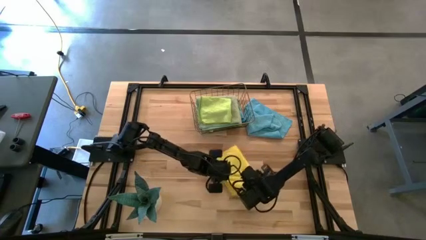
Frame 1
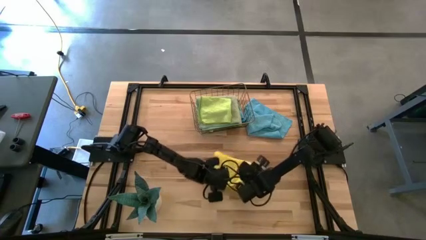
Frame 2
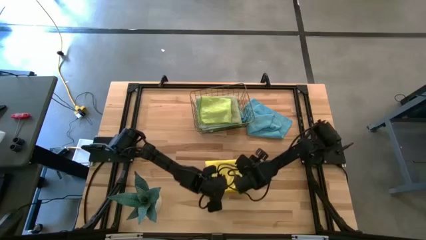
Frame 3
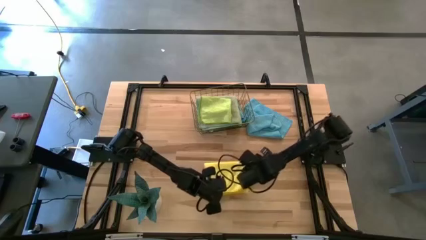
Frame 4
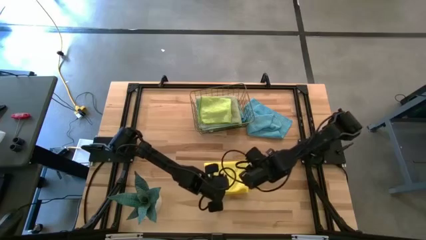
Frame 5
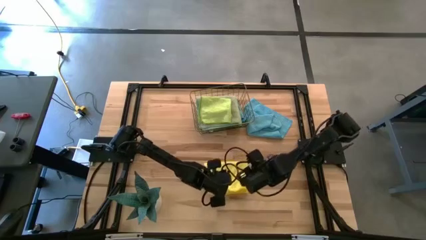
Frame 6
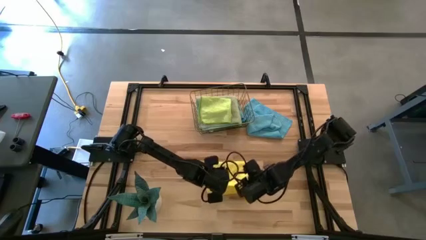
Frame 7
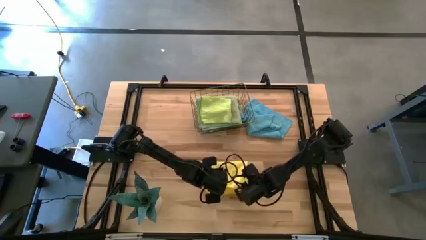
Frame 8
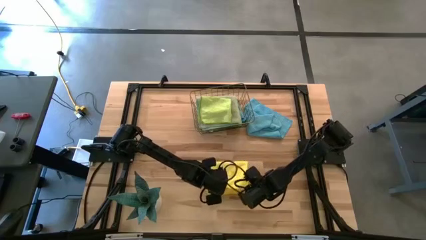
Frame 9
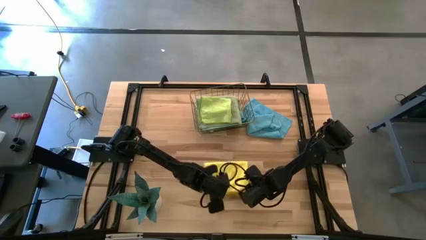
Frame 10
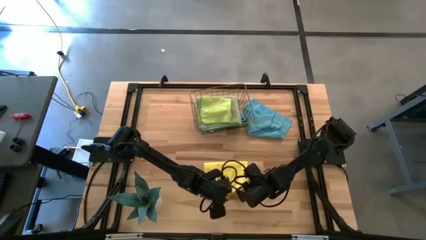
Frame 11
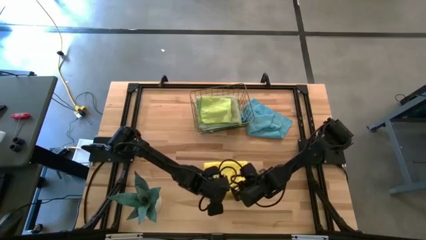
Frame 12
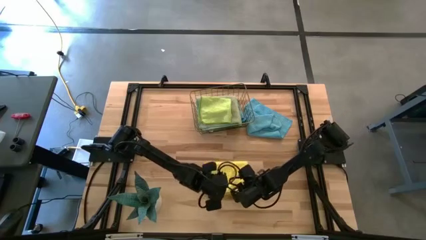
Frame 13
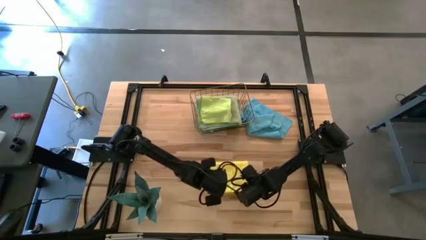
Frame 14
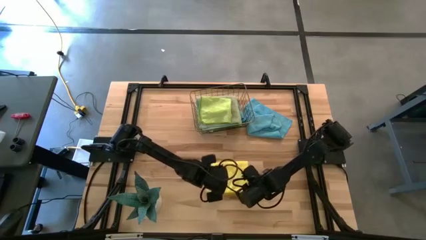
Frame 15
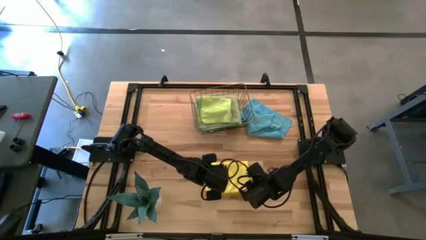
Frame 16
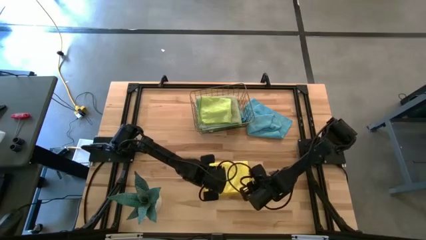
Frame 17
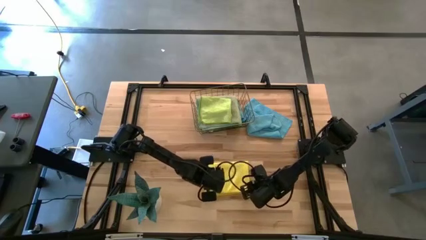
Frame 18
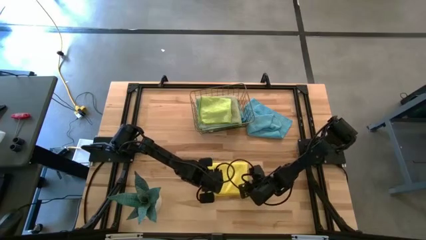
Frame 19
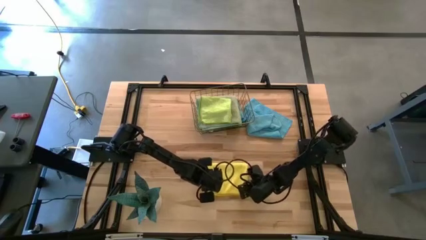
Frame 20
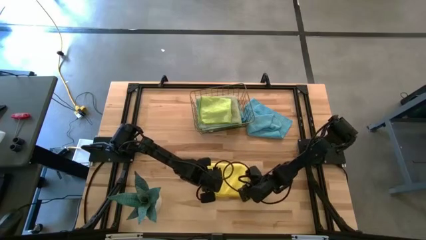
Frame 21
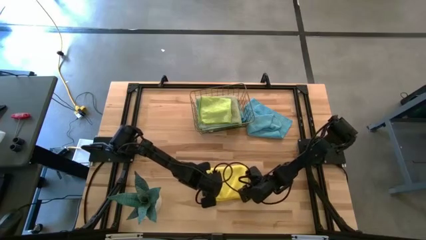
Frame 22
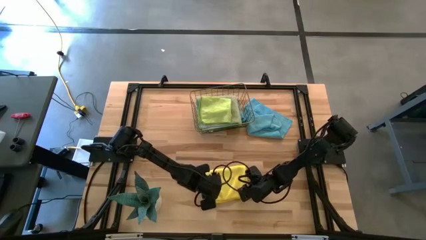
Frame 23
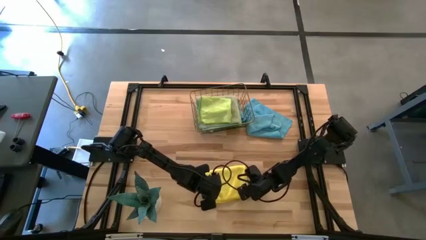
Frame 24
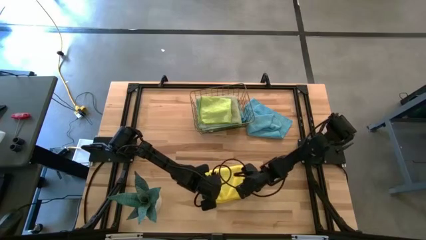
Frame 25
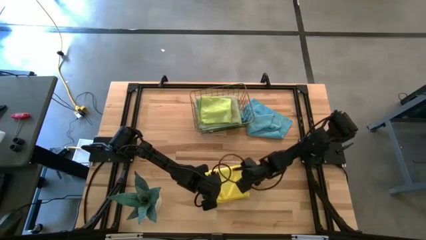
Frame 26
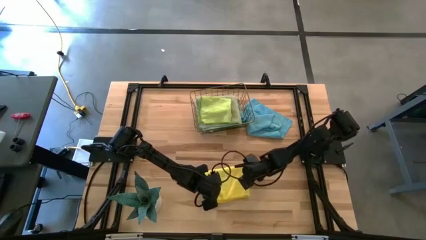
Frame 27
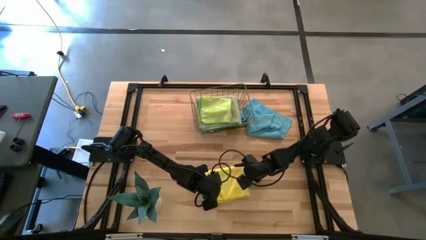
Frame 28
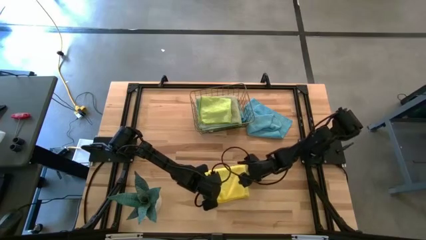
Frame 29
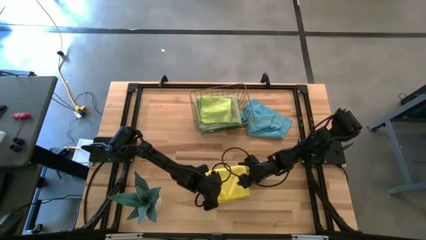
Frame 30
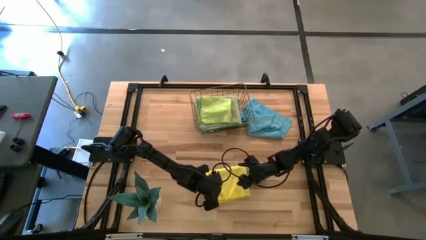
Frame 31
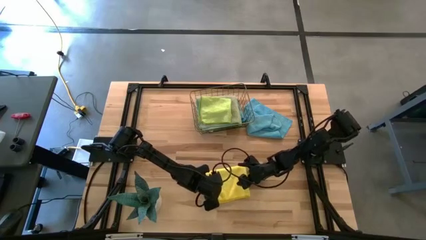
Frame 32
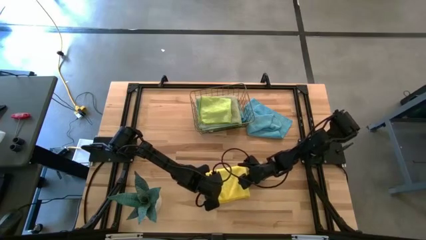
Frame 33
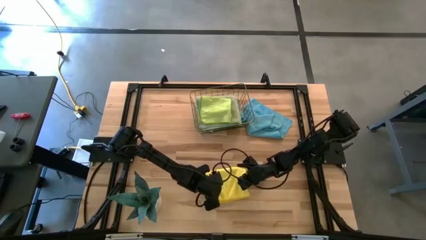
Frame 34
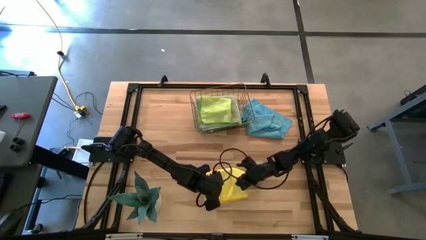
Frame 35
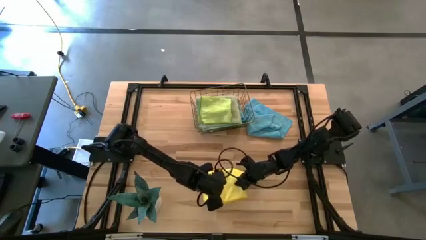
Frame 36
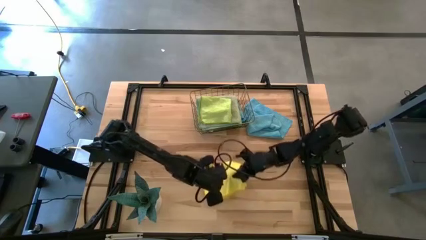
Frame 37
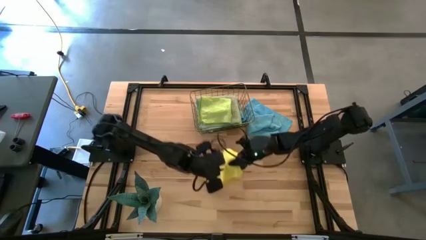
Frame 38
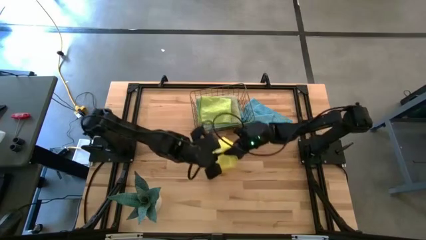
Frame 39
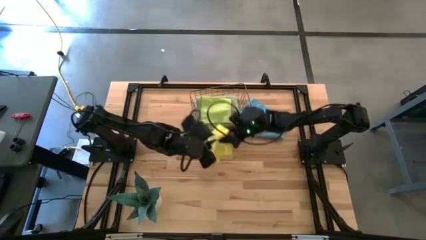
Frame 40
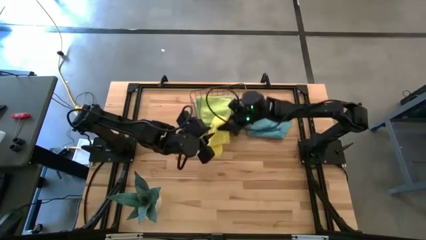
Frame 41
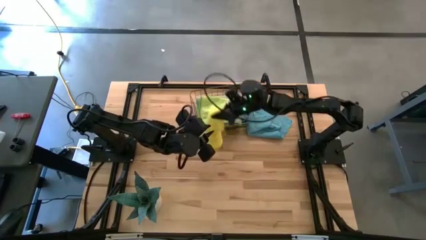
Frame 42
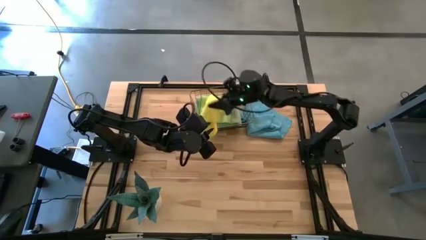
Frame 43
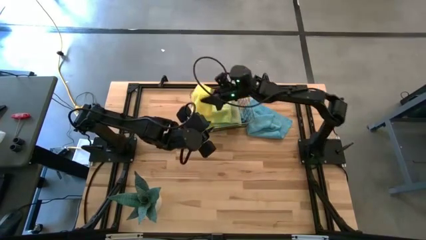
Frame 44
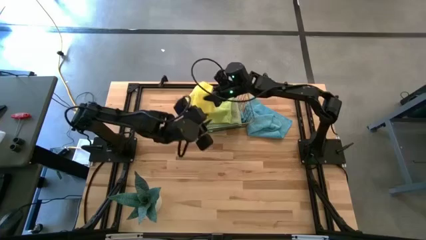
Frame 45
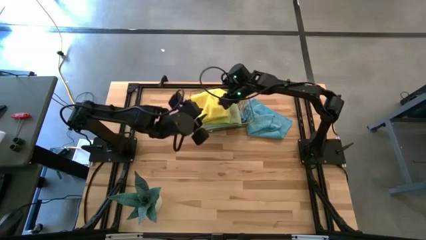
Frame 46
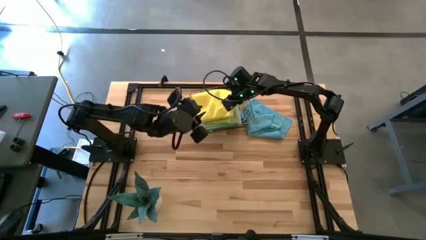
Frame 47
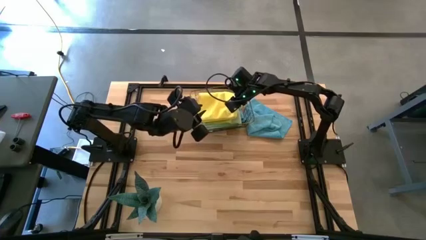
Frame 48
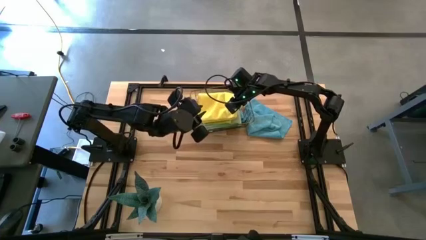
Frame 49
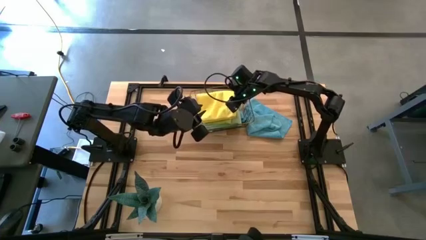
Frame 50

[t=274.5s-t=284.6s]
Task: Fold microfiber towels
Stack the yellow towel on top of the stacked towels into the wire basket
